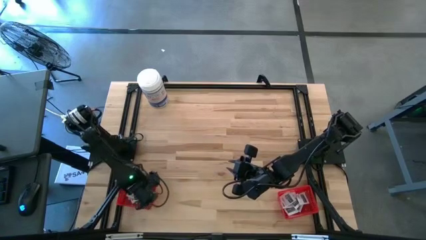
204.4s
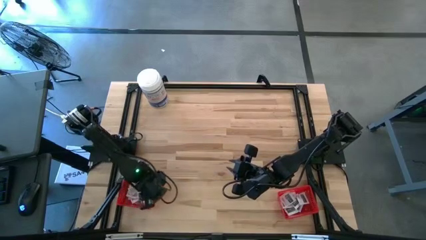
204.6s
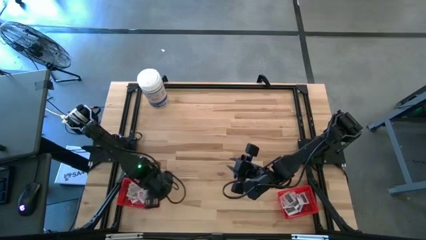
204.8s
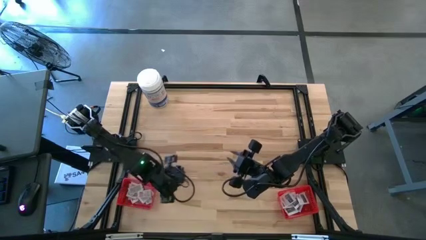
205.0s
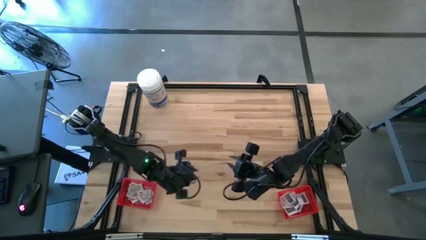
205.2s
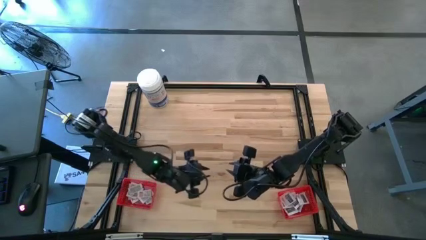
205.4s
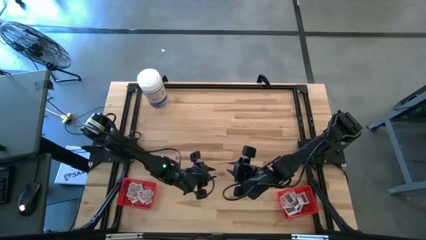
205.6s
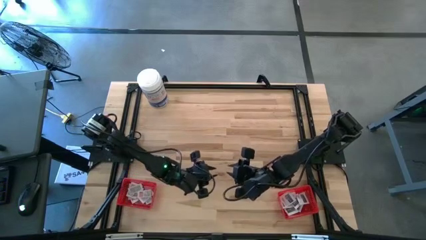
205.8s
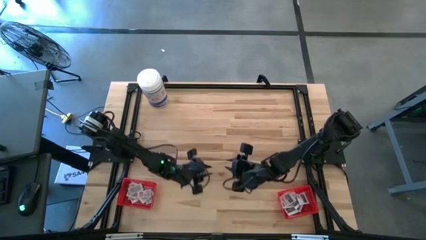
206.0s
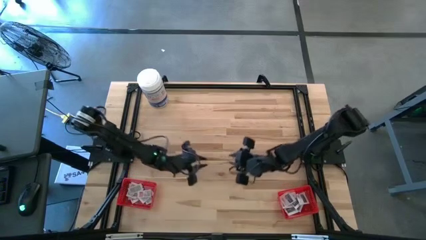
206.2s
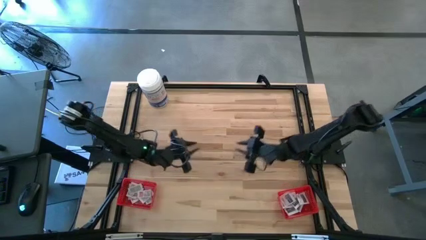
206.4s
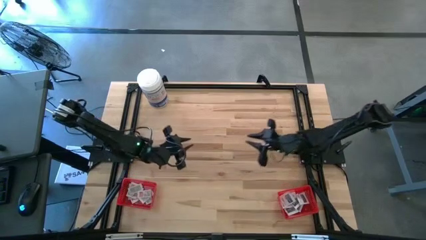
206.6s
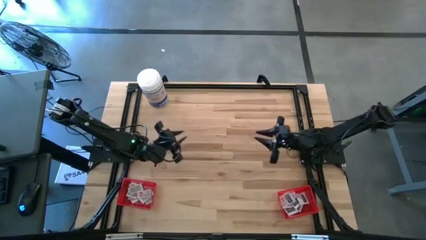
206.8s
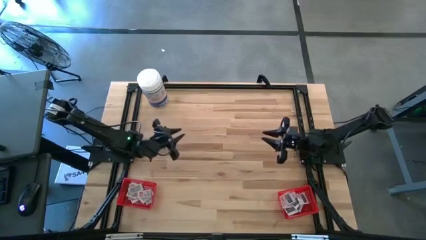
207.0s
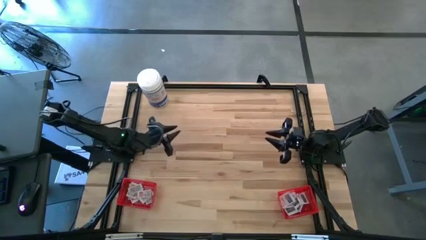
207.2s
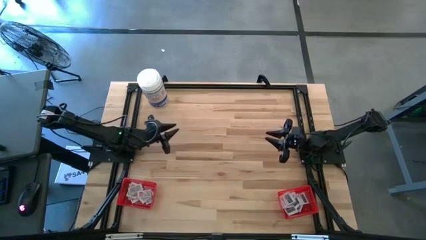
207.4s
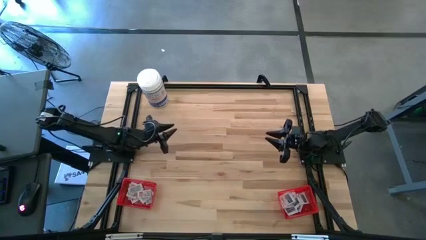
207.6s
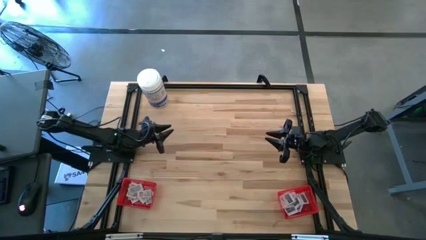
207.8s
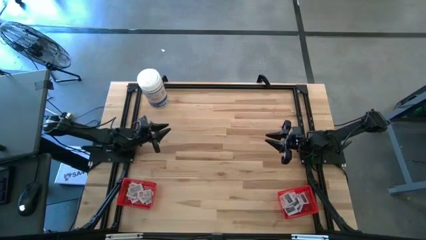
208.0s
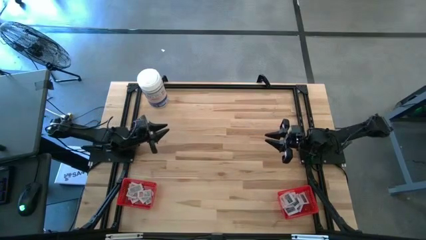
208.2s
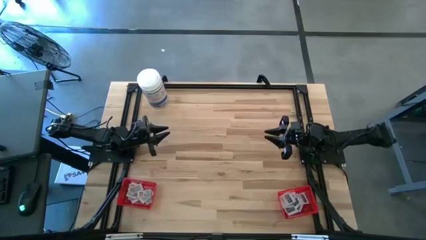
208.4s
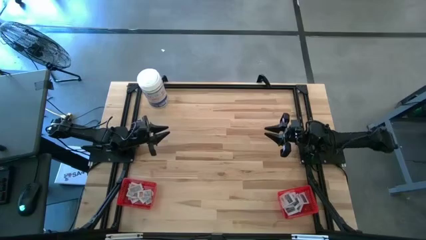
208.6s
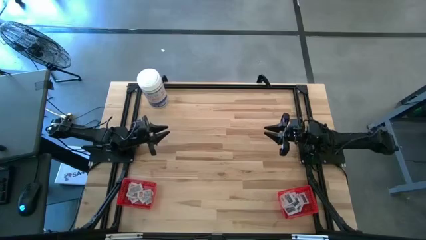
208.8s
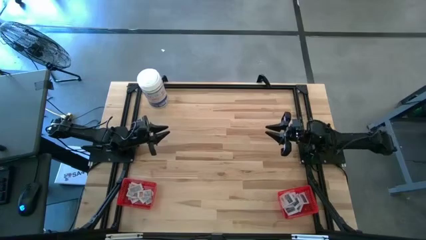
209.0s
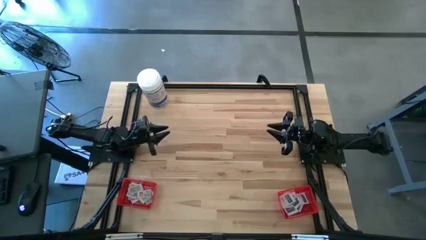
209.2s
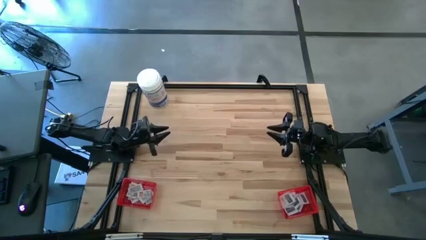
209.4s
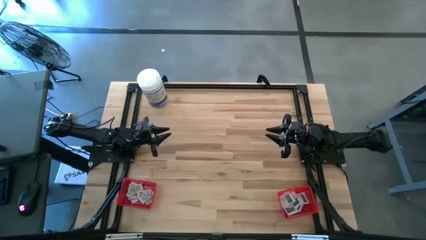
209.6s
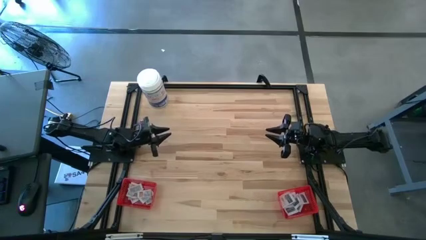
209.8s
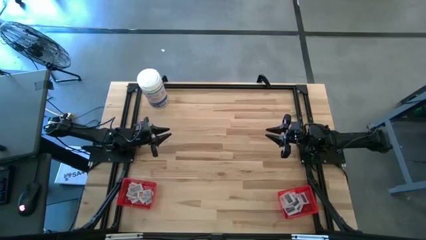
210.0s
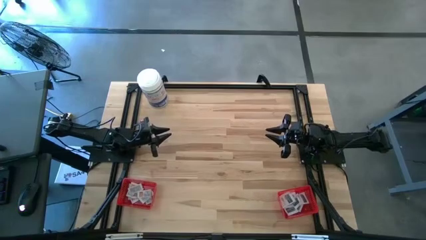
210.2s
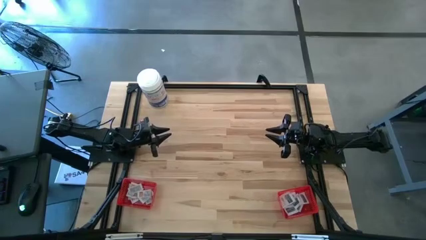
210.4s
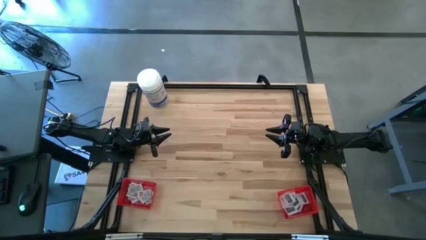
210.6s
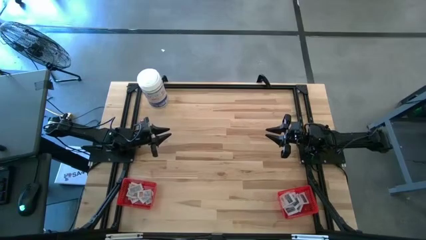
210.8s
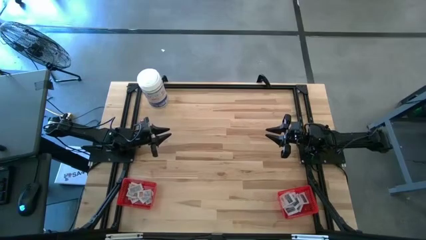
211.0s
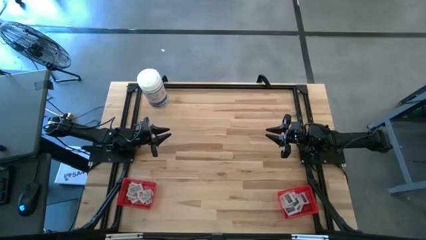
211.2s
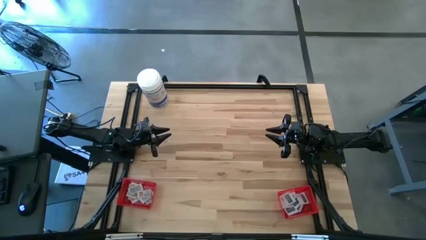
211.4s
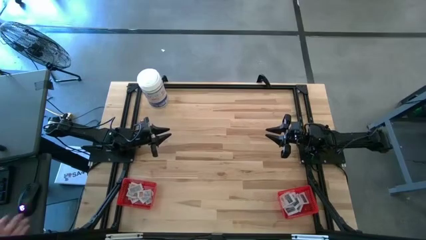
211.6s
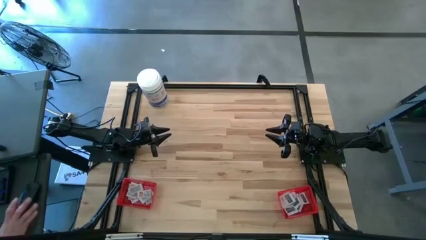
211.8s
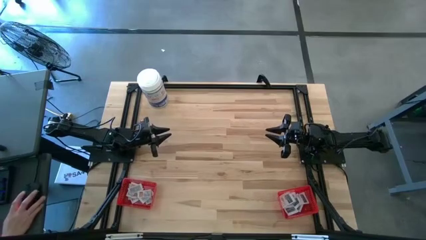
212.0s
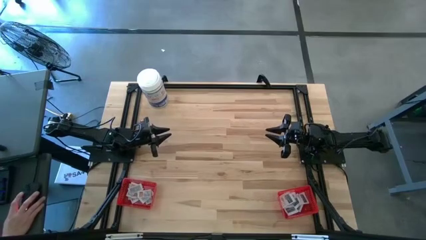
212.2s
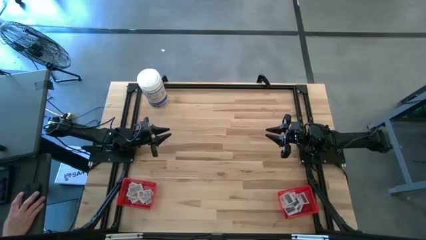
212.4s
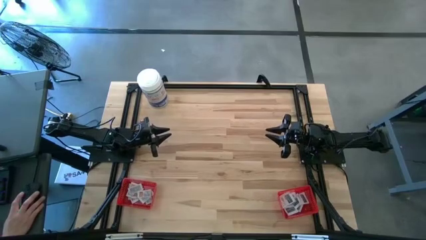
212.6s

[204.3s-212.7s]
Task: Pick & Place First Aid Supplies
Return to Home Position

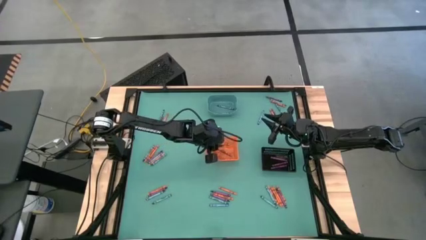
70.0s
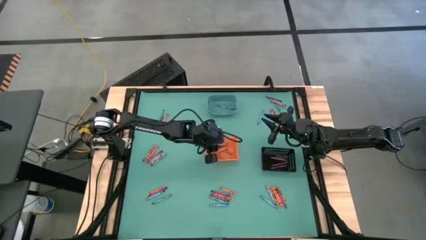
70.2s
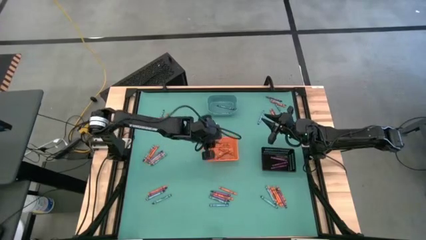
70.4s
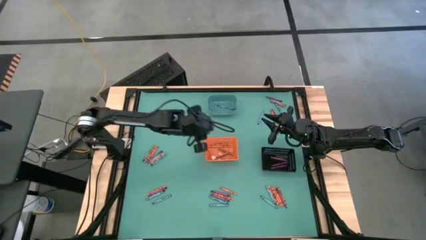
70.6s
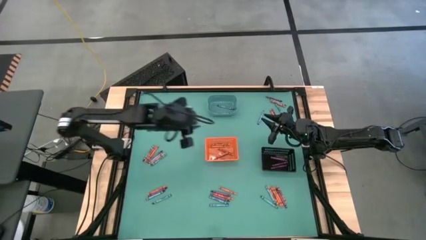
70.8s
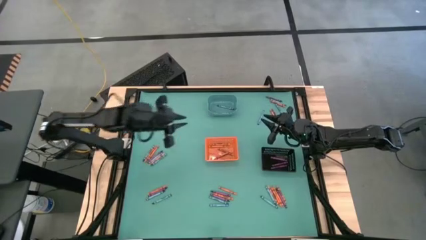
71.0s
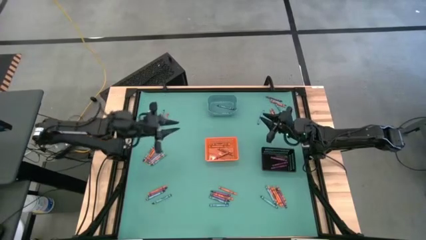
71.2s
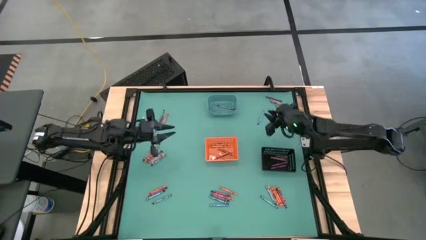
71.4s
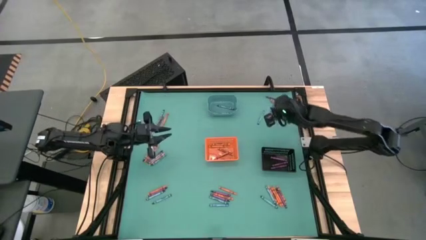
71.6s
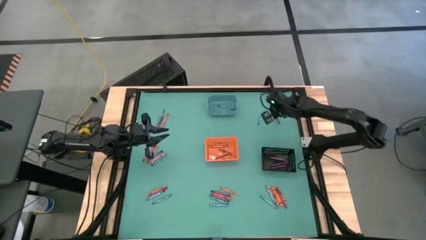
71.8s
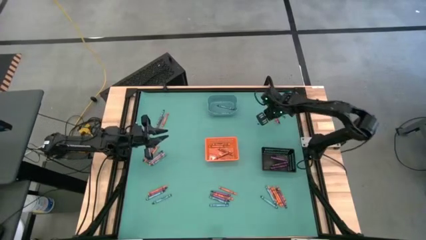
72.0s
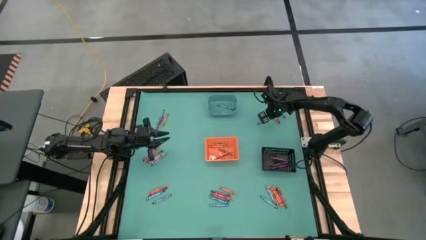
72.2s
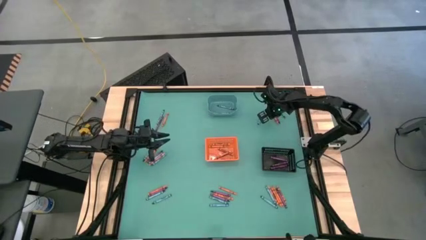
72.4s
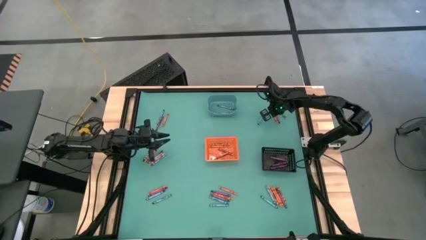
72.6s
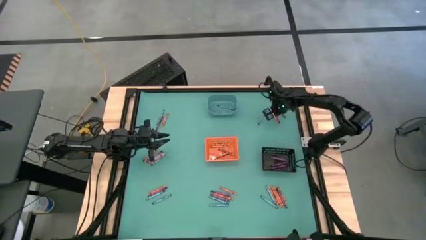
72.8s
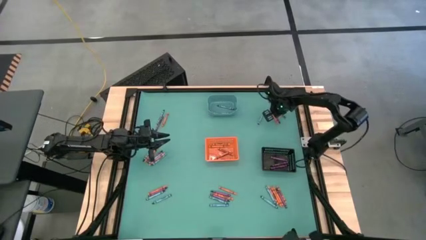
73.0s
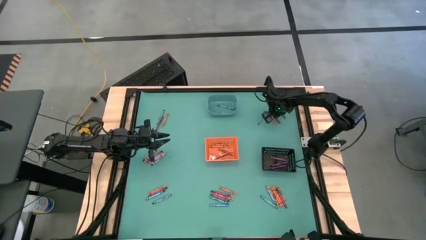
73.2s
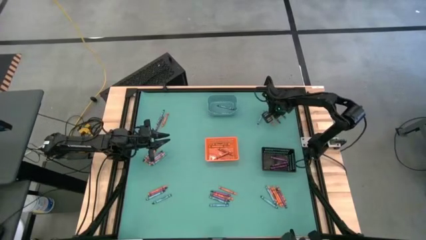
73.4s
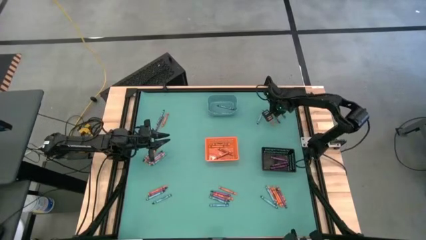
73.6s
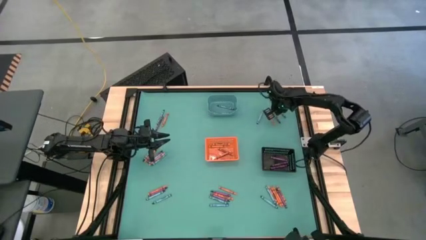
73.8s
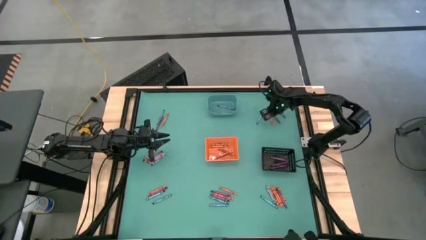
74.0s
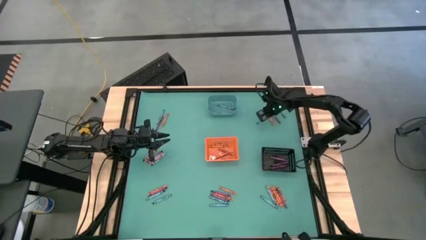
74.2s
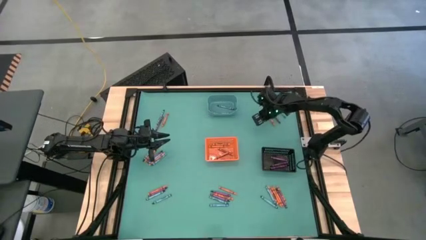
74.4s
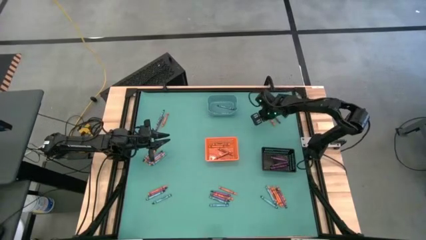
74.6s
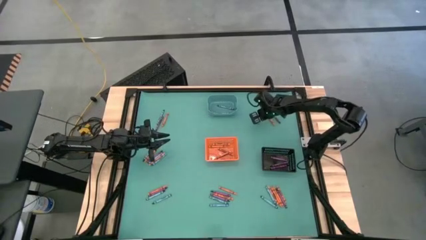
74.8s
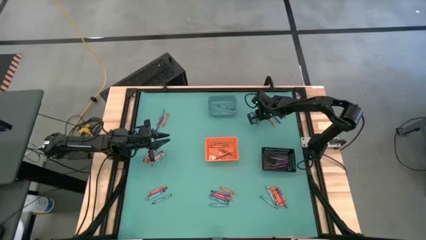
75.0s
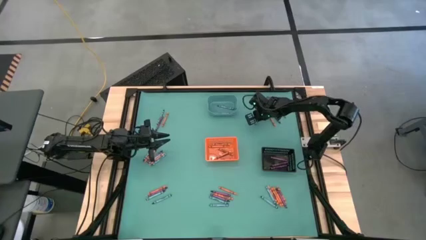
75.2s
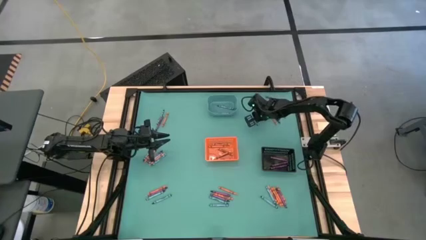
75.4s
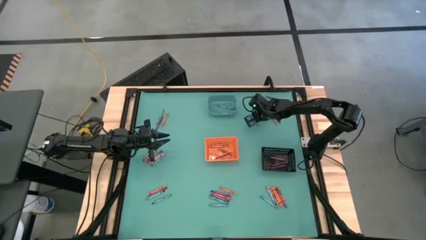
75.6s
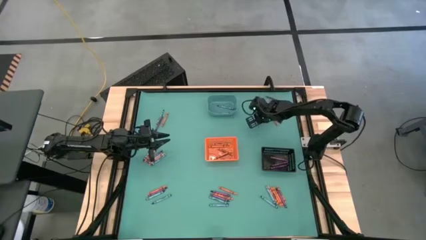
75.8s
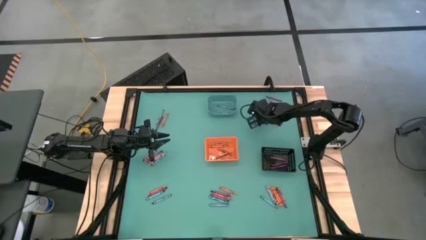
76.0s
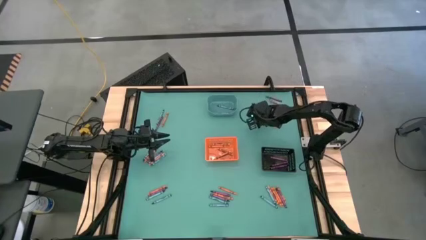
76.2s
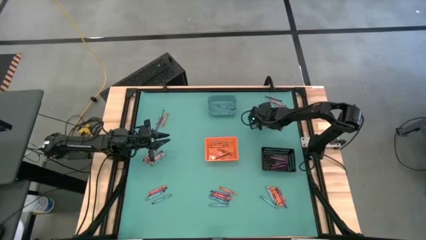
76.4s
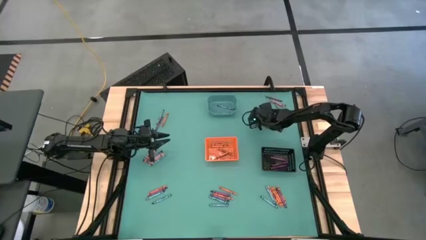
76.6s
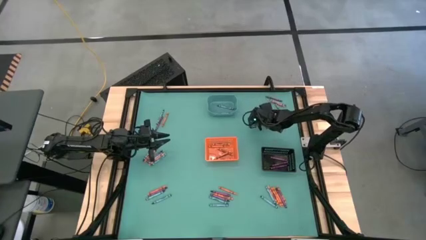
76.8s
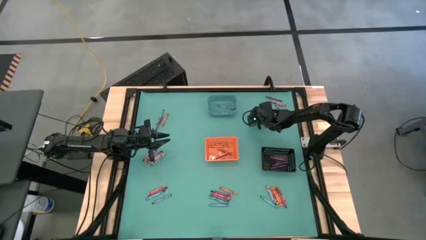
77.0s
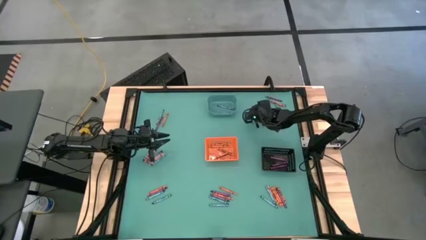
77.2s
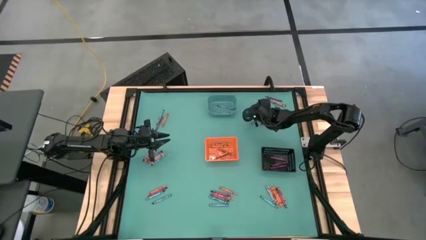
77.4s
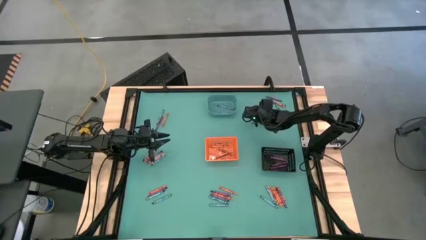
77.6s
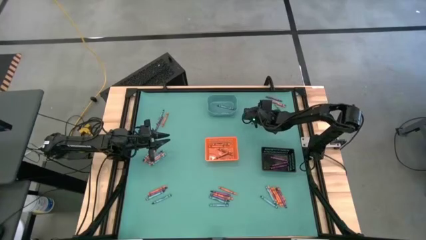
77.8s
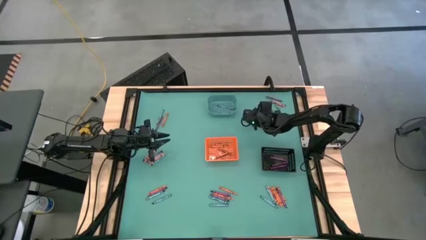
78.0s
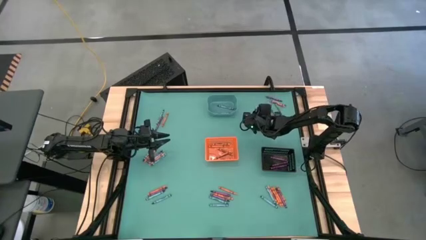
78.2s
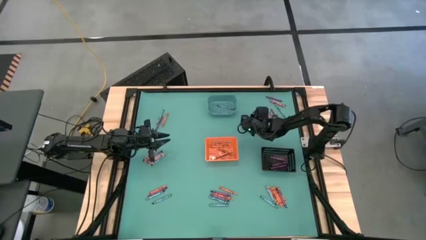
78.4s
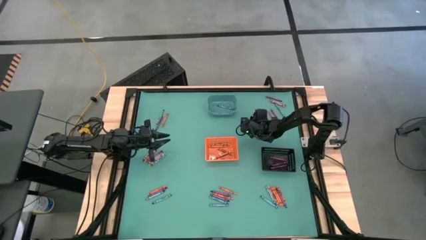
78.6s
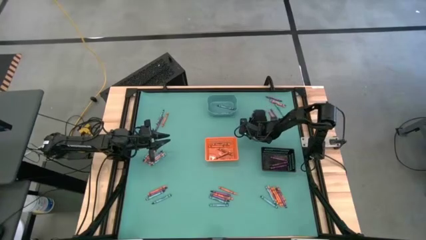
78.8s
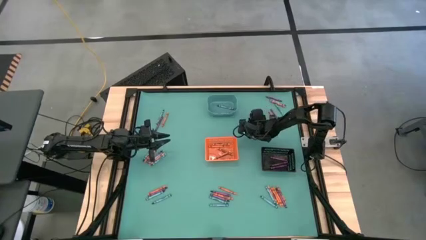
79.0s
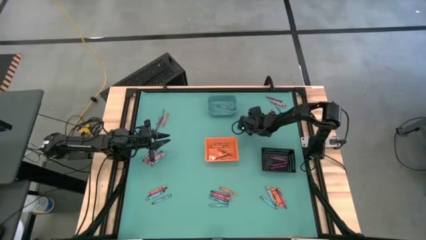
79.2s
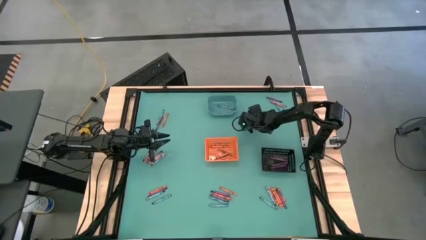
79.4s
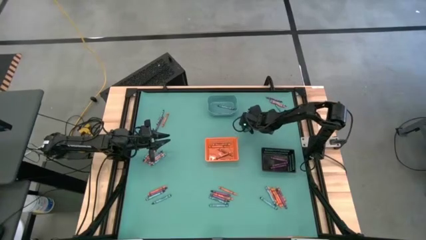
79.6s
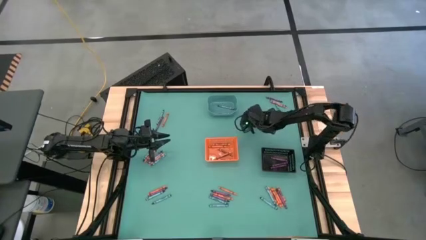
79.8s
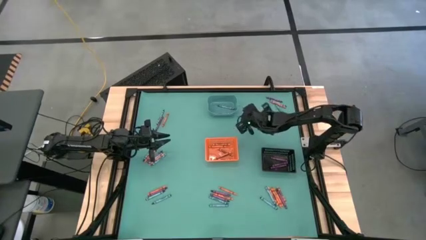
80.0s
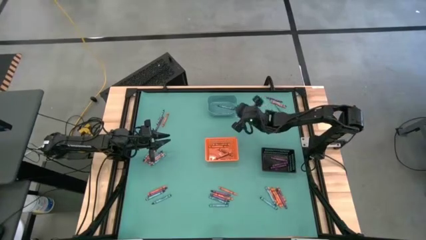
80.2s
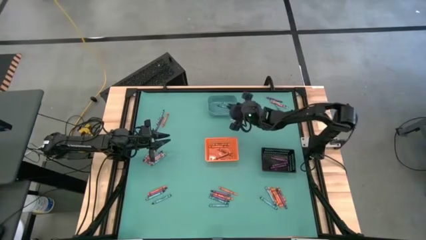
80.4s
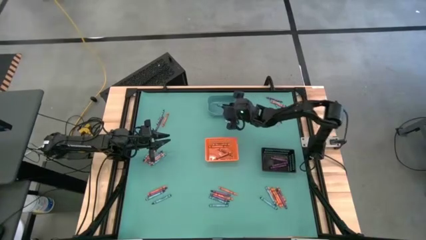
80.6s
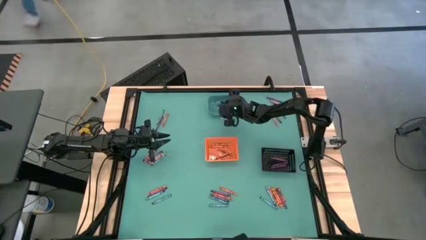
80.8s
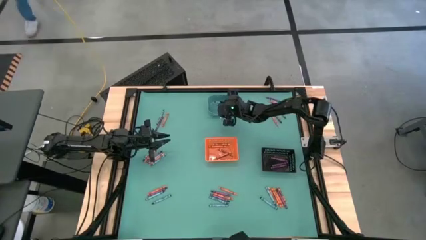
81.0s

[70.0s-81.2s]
Task: Sort crayons
Put the blue crayon into the blue bin
